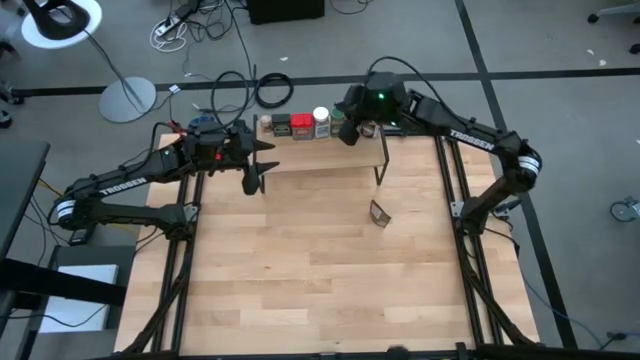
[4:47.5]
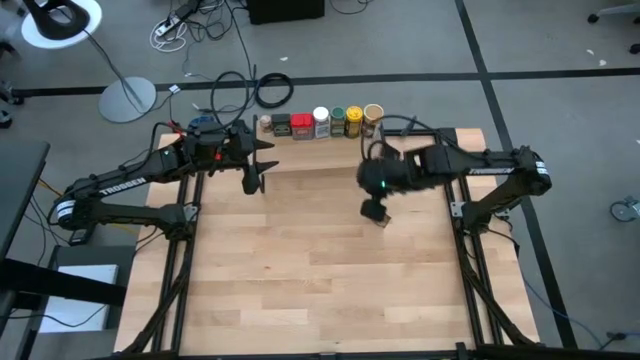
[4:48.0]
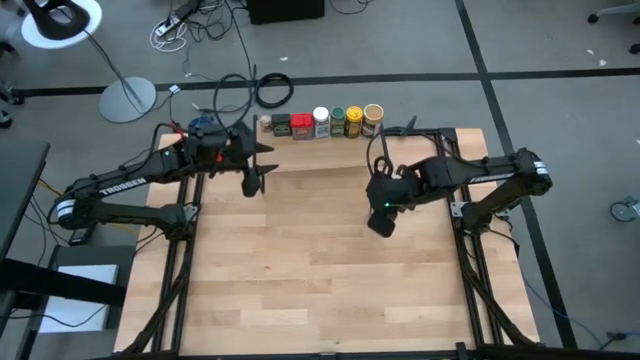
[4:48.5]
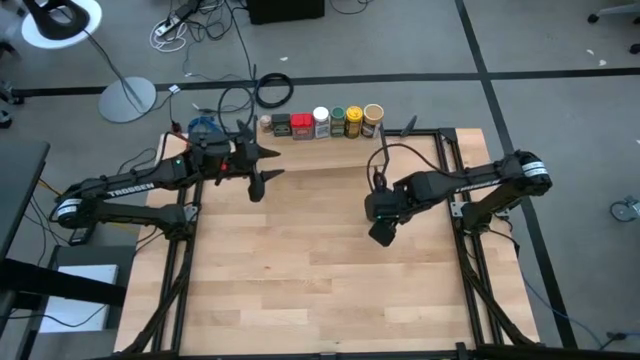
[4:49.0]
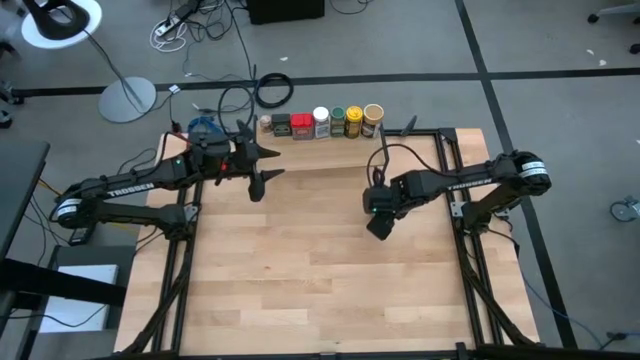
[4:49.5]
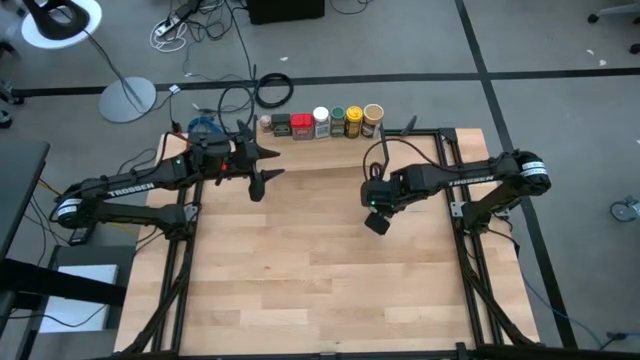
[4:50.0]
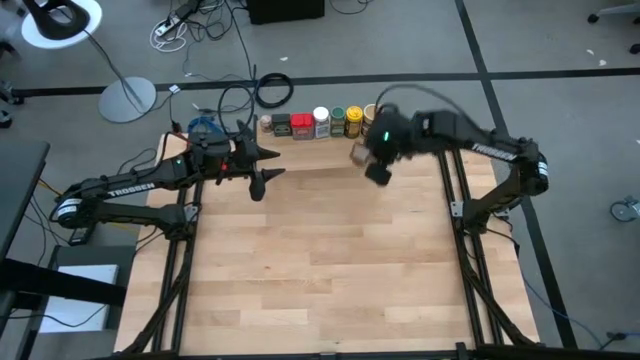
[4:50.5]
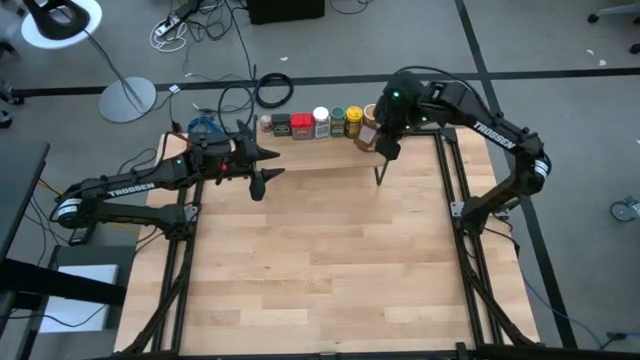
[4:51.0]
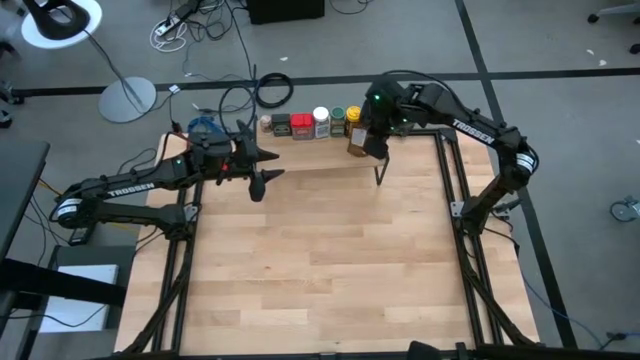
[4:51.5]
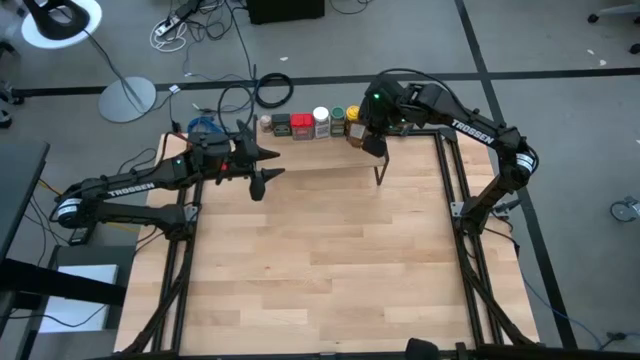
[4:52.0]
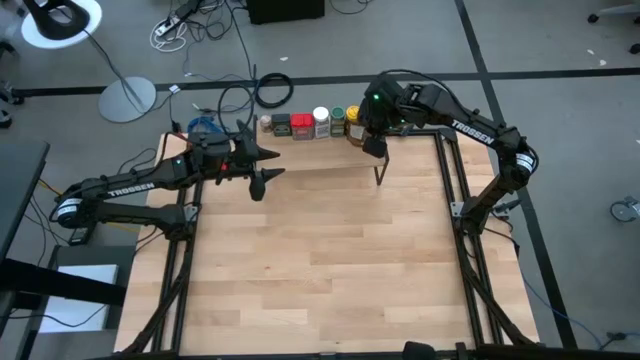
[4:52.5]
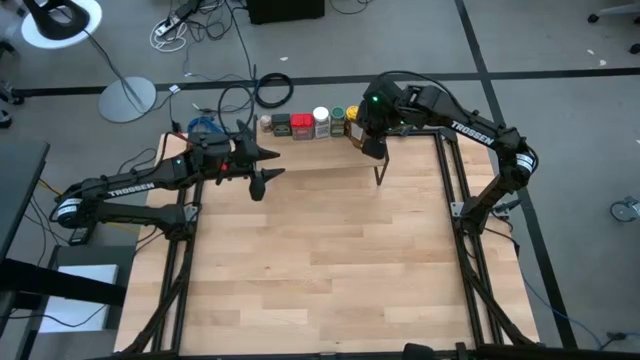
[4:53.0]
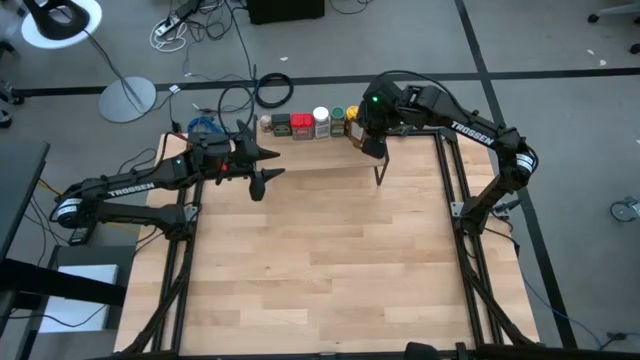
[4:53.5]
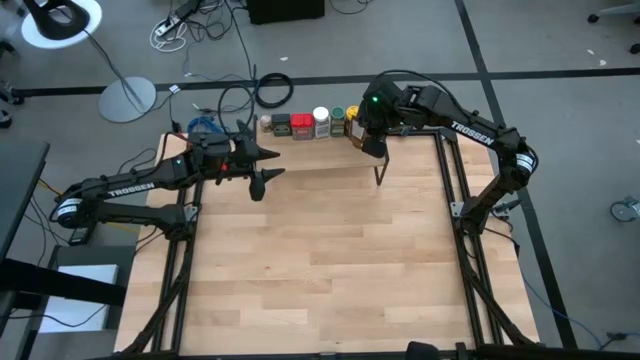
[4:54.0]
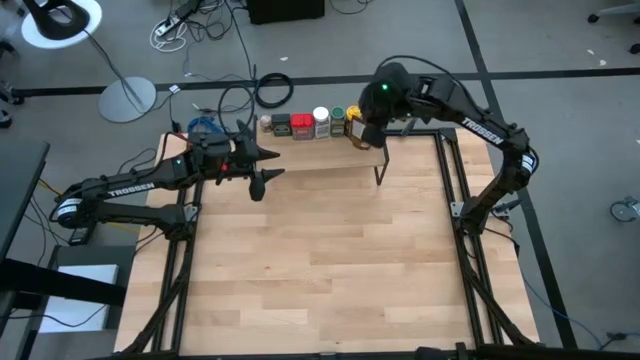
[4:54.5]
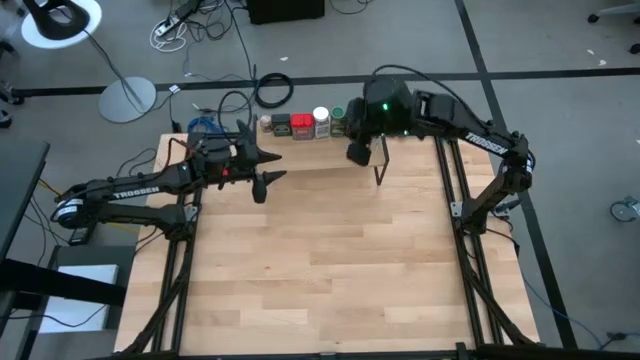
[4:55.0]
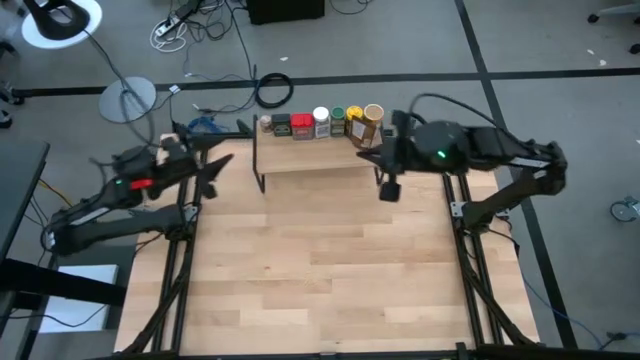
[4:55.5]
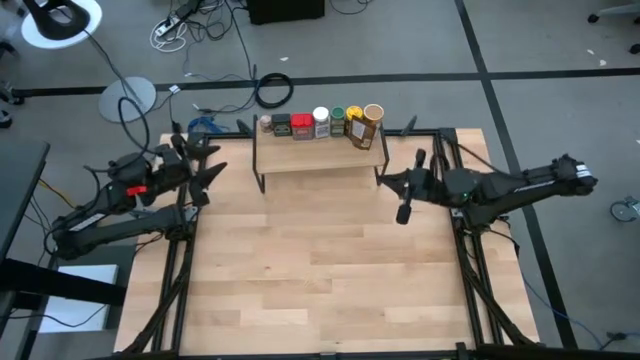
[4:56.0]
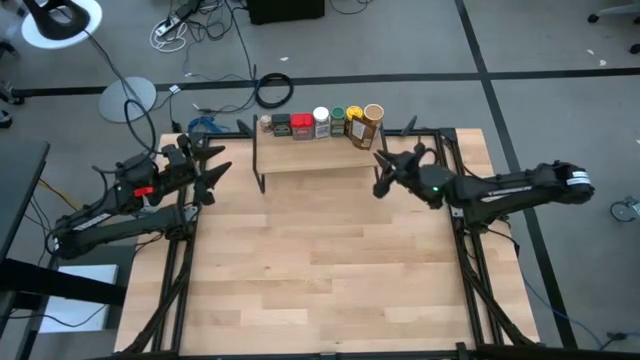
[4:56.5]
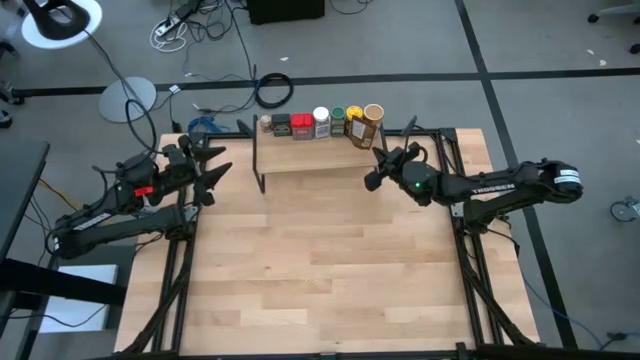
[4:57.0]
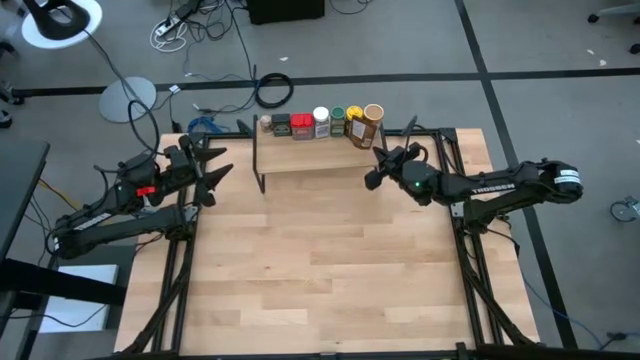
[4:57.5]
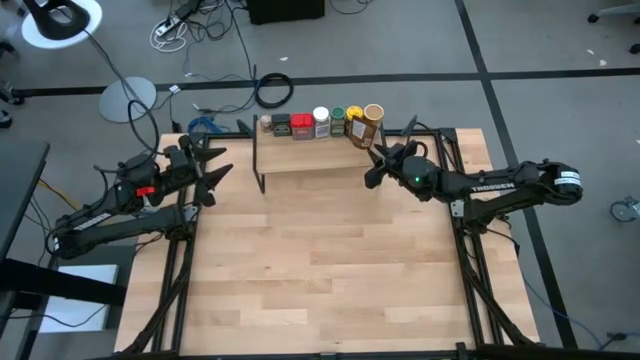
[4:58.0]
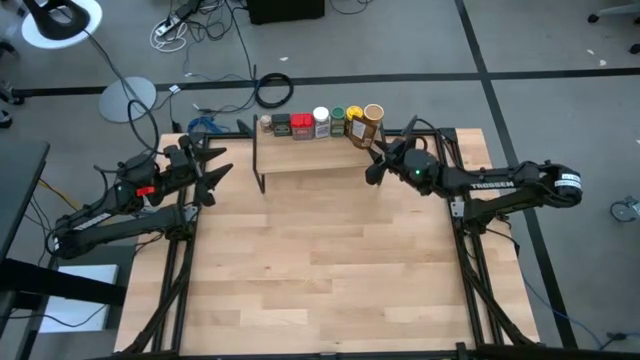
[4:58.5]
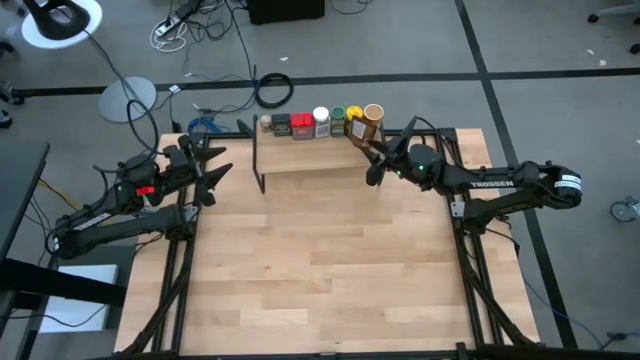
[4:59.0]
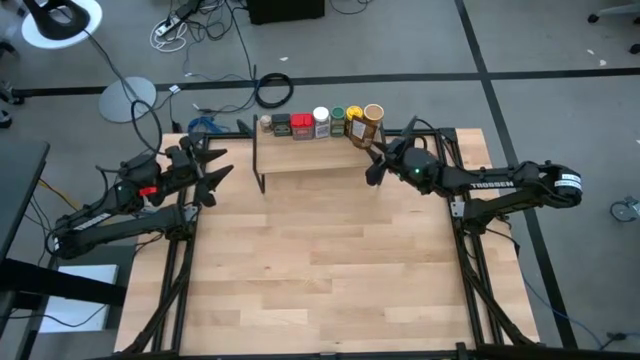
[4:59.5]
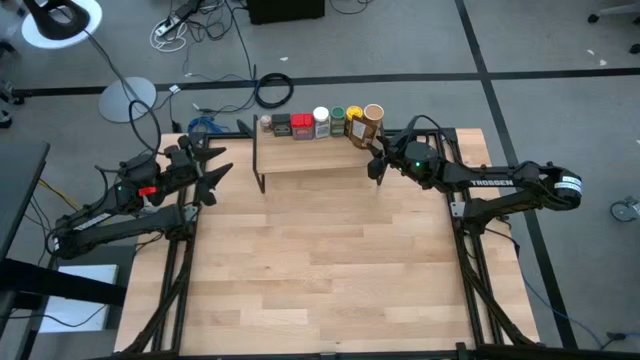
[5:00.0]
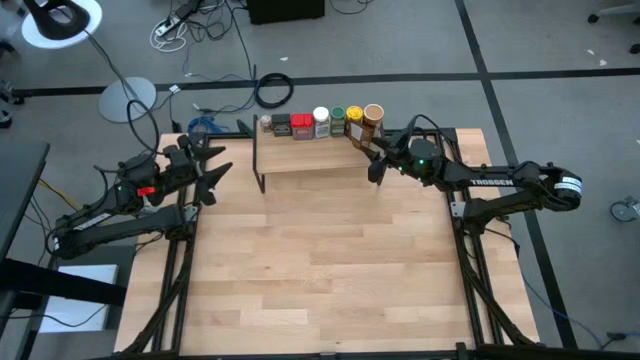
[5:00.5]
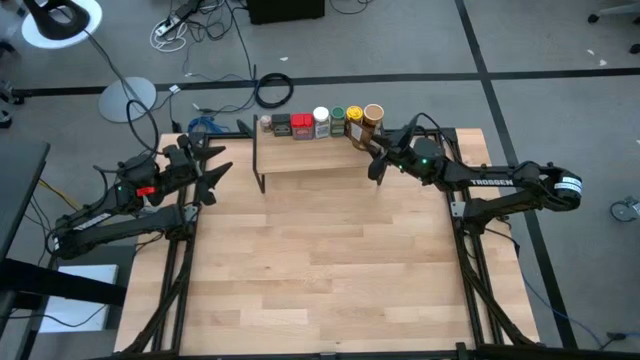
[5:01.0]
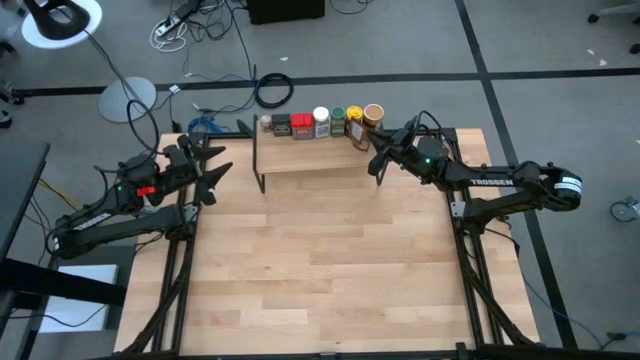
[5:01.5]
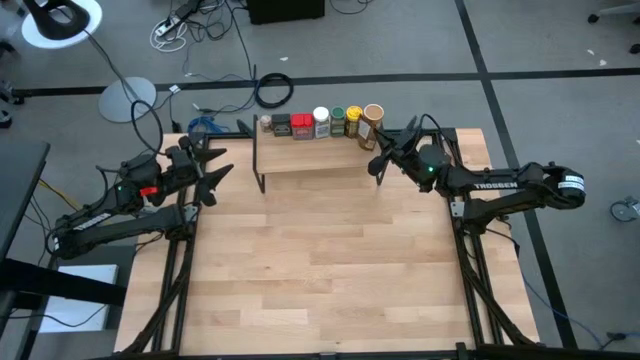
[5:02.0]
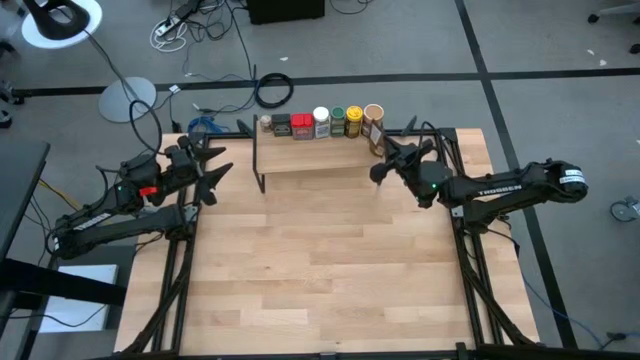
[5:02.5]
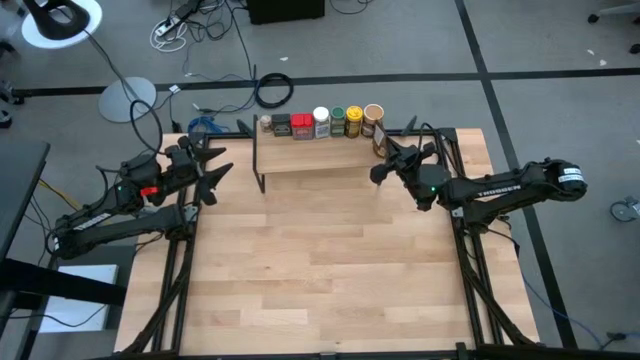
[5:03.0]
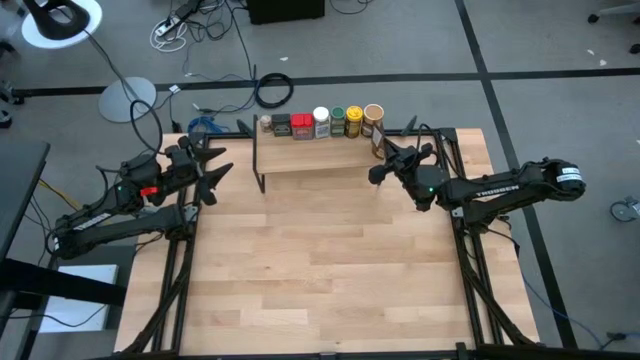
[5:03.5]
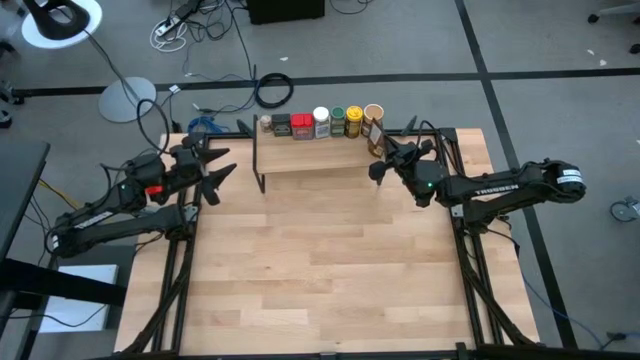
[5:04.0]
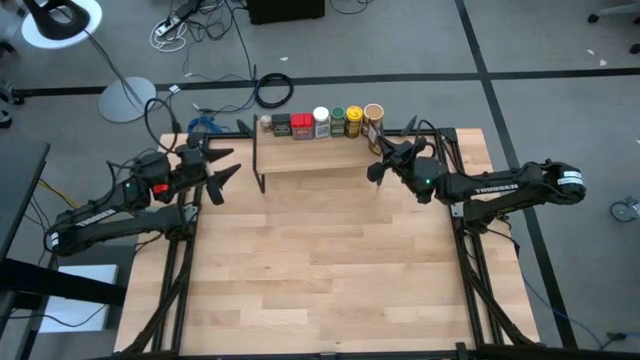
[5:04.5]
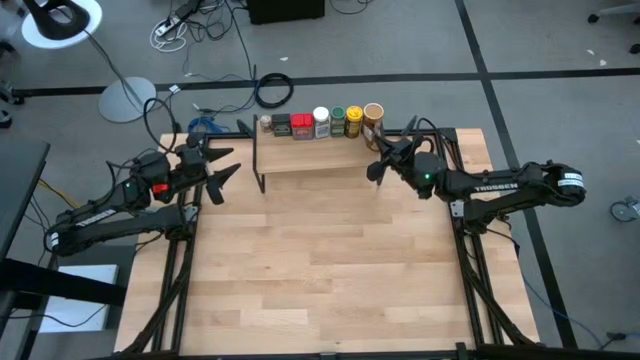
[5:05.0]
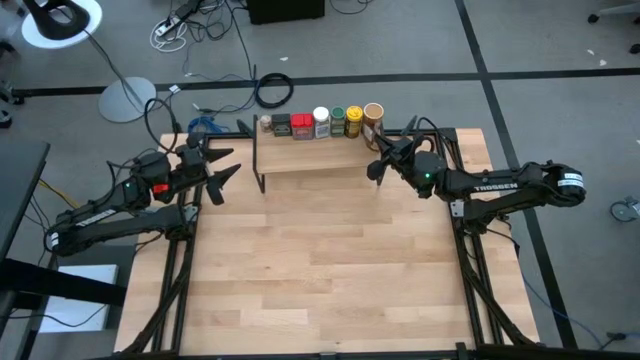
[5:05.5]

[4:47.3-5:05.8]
Task: Shelf spices
Put the orange seasoning pack on the shelf

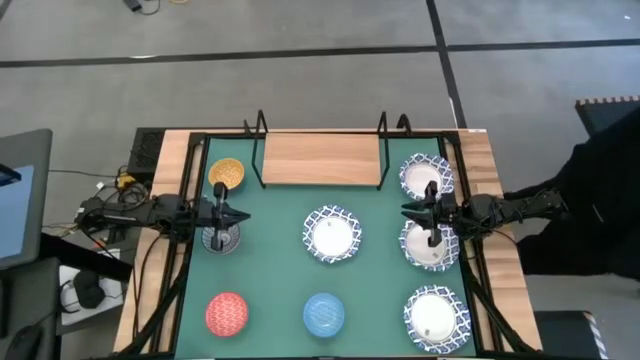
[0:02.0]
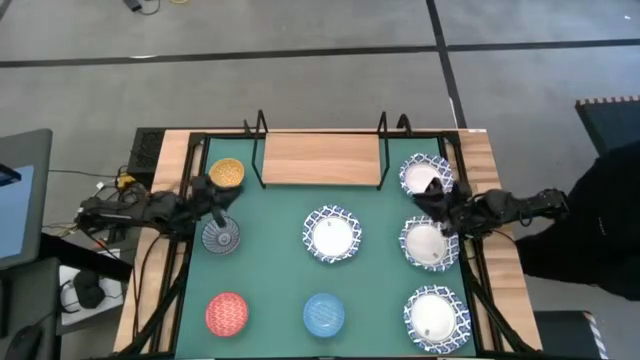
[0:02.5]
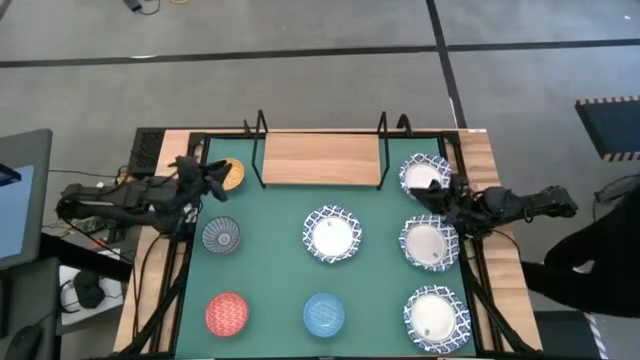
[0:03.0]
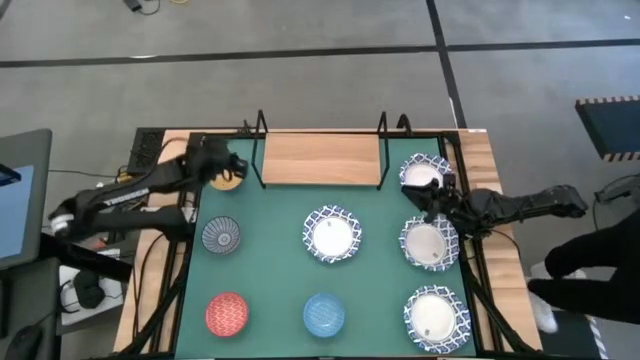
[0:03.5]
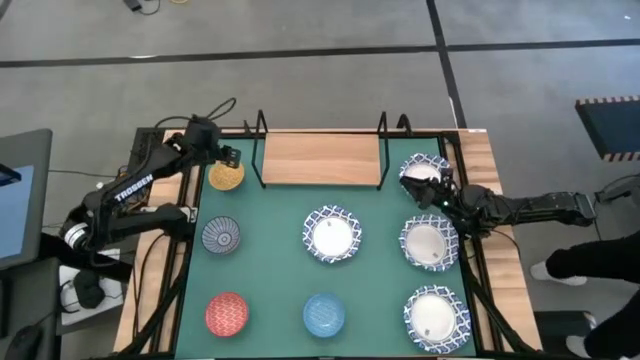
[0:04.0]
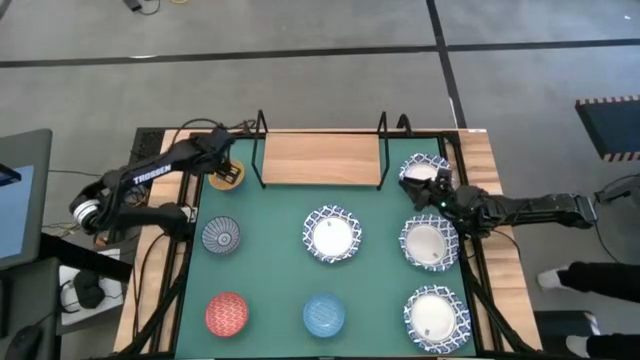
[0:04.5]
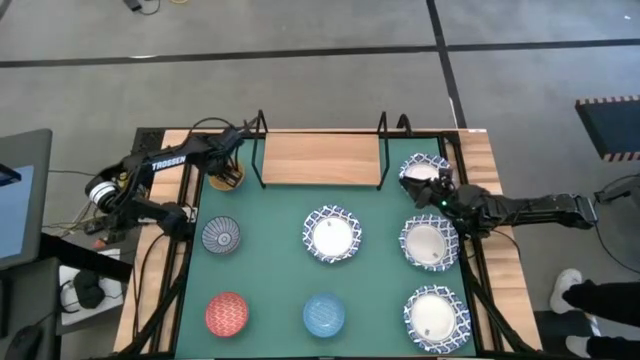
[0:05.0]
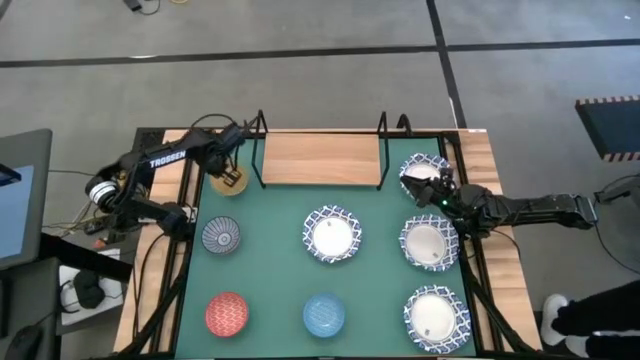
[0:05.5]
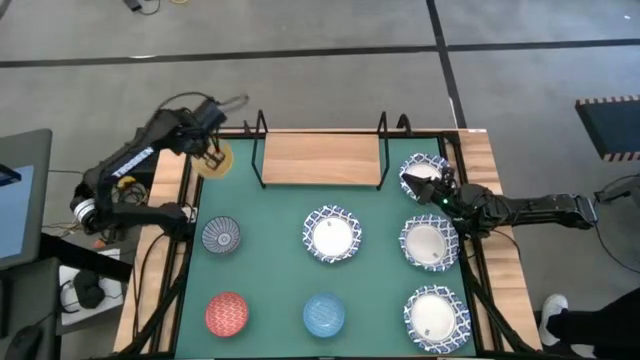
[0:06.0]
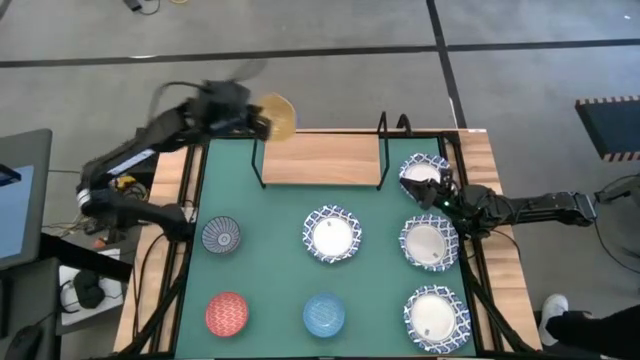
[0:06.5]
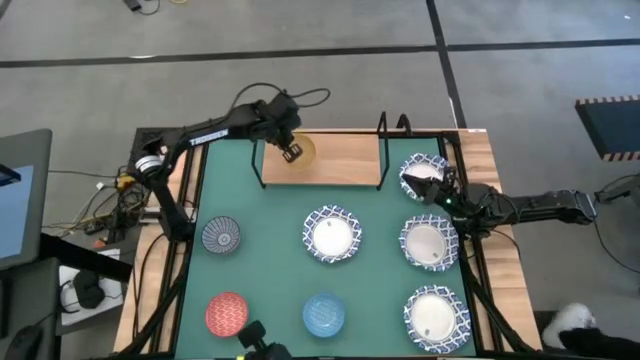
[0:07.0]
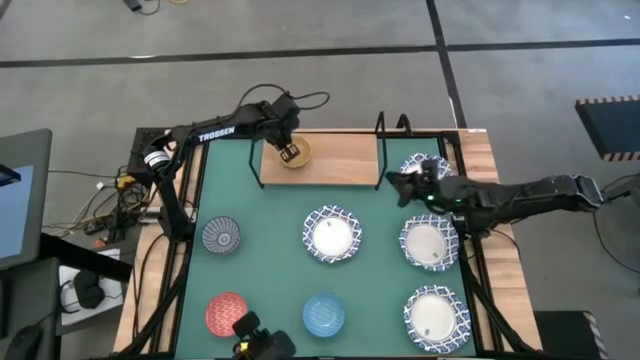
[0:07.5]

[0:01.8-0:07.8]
Task: Place and stack bowls onto a shelf
Put the small yellow bowl on the shelf
